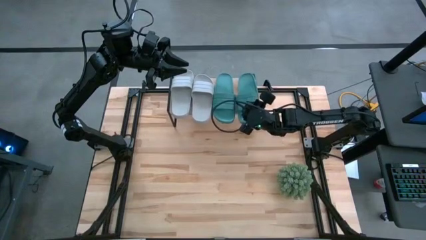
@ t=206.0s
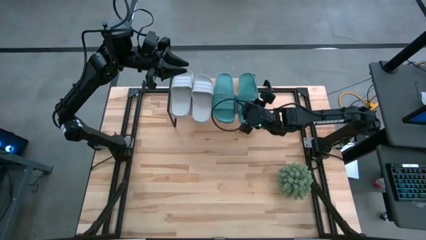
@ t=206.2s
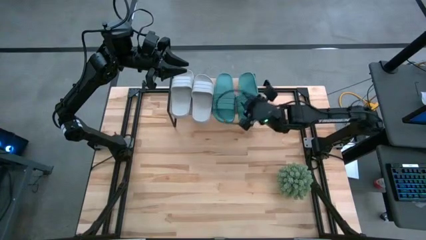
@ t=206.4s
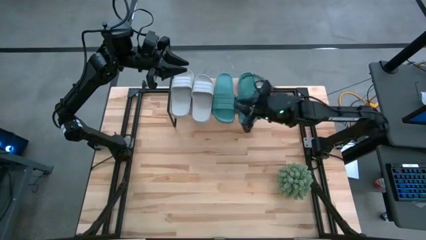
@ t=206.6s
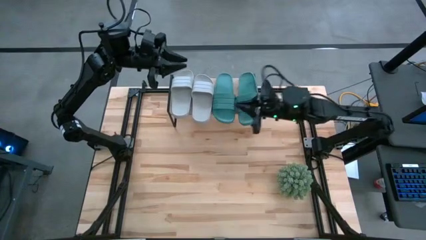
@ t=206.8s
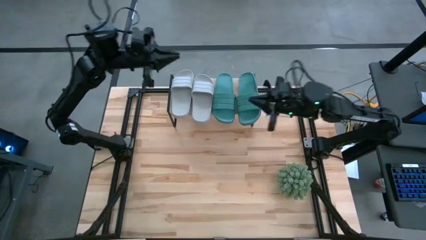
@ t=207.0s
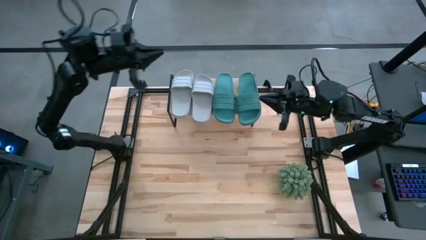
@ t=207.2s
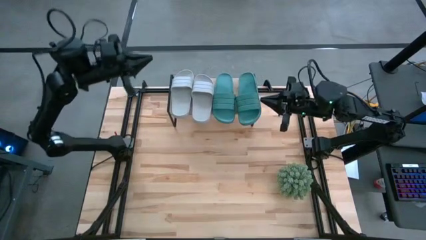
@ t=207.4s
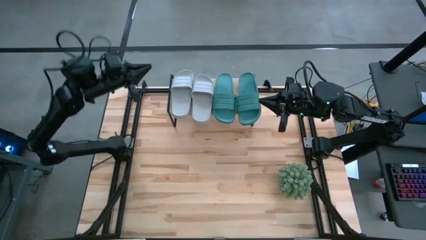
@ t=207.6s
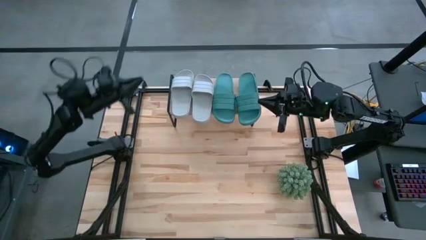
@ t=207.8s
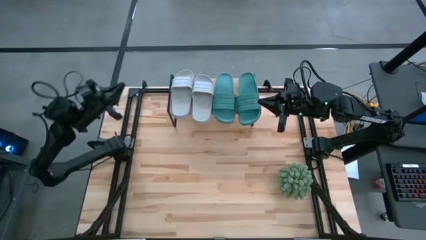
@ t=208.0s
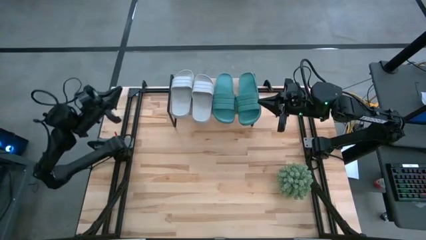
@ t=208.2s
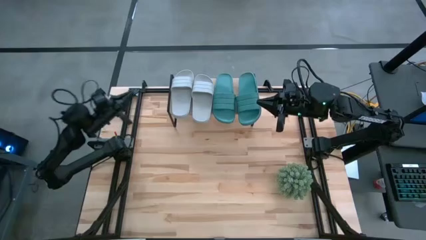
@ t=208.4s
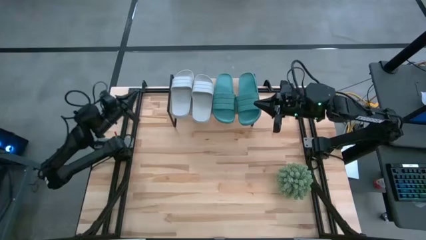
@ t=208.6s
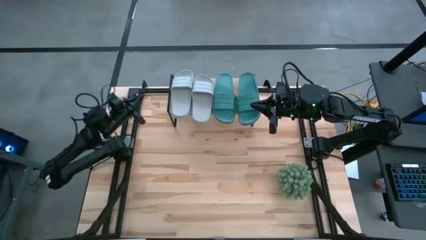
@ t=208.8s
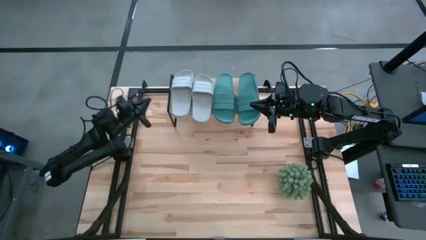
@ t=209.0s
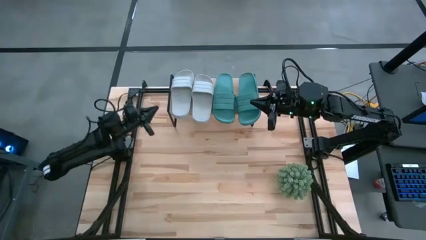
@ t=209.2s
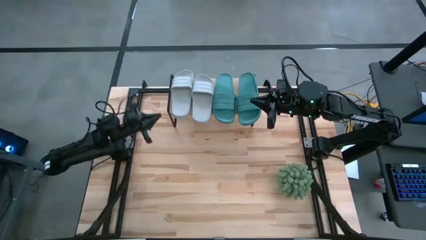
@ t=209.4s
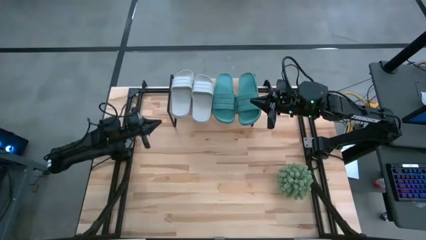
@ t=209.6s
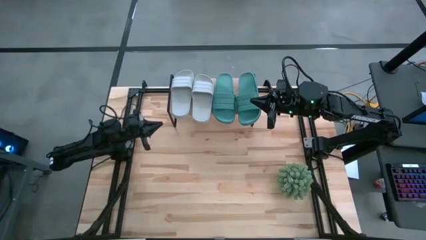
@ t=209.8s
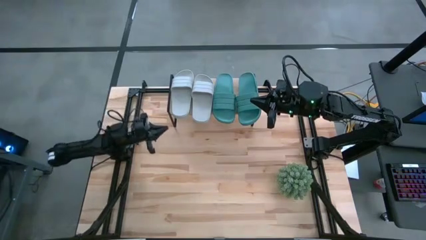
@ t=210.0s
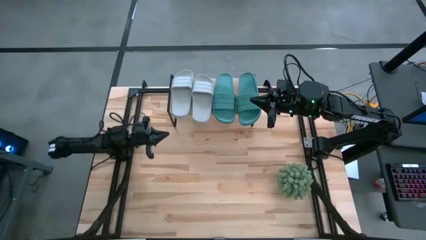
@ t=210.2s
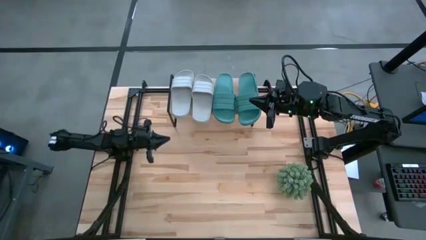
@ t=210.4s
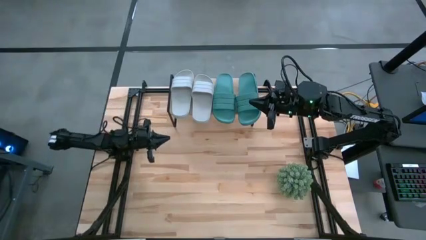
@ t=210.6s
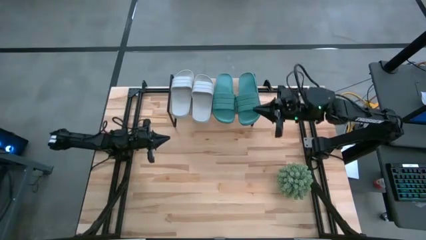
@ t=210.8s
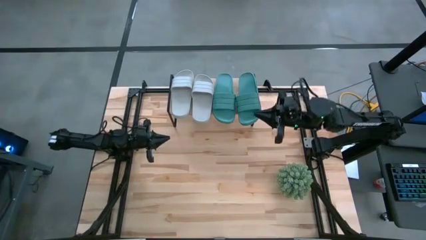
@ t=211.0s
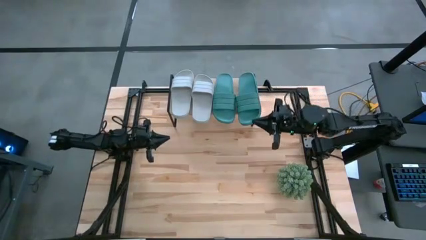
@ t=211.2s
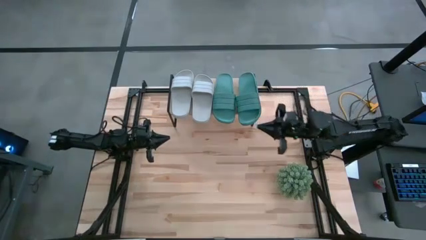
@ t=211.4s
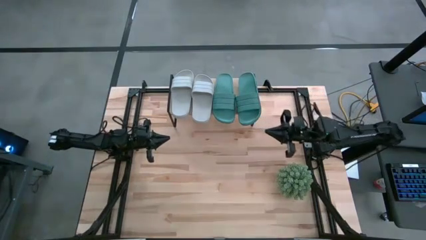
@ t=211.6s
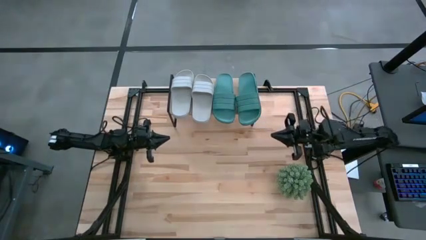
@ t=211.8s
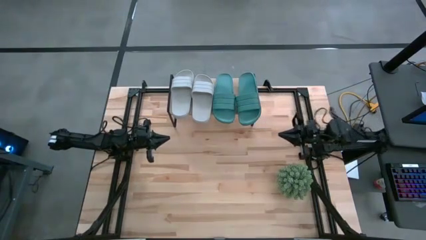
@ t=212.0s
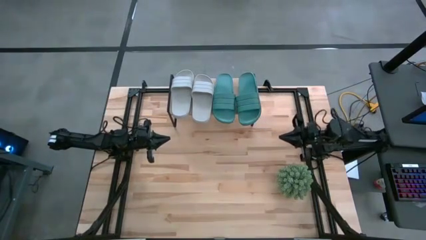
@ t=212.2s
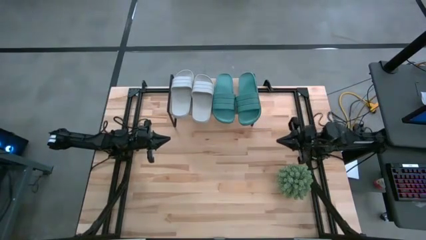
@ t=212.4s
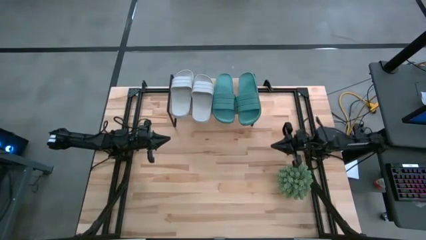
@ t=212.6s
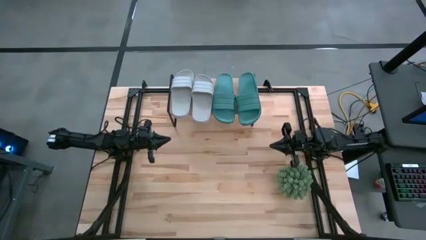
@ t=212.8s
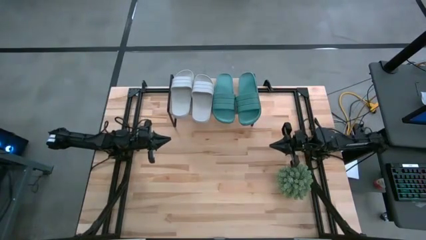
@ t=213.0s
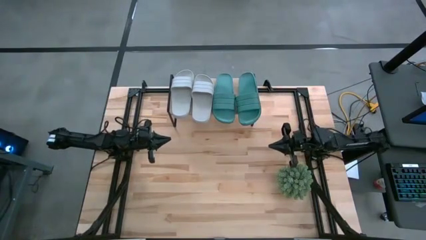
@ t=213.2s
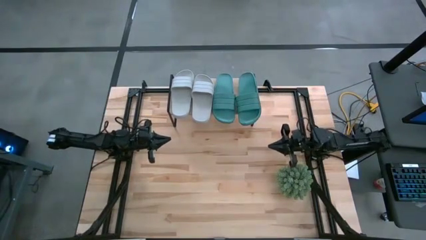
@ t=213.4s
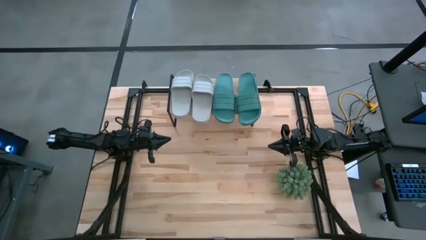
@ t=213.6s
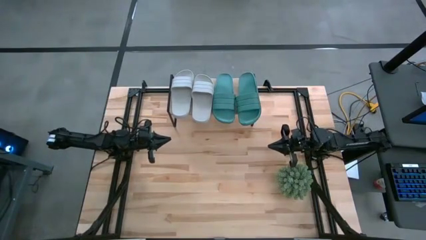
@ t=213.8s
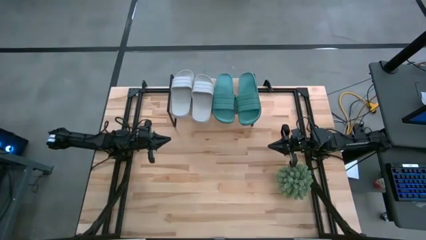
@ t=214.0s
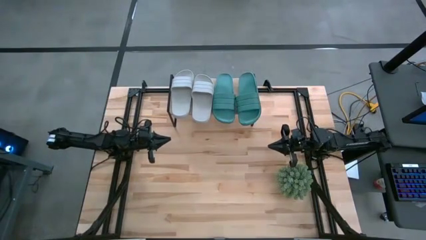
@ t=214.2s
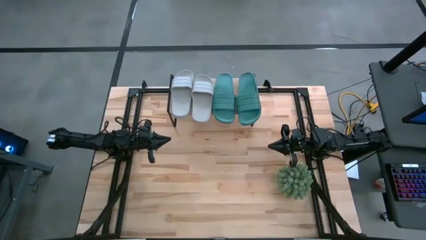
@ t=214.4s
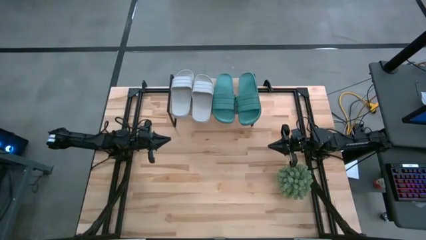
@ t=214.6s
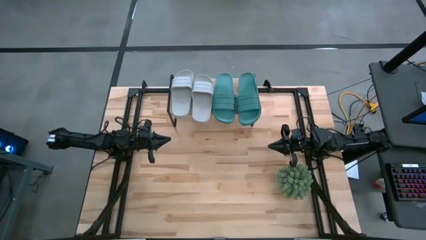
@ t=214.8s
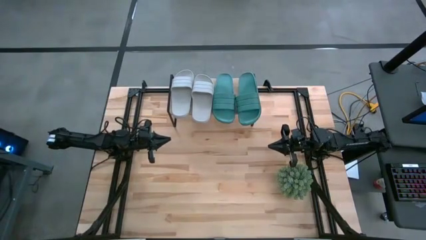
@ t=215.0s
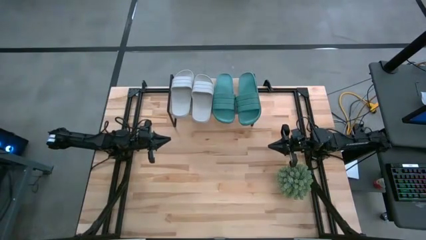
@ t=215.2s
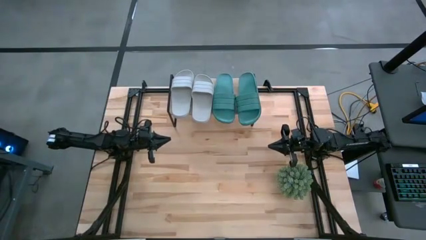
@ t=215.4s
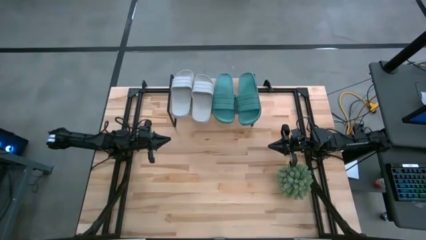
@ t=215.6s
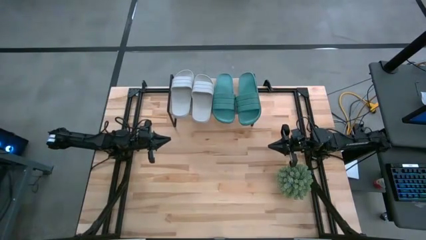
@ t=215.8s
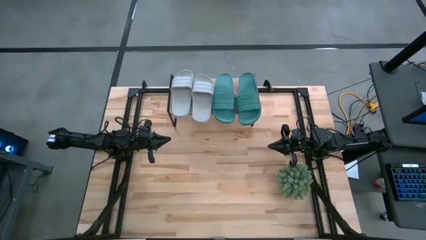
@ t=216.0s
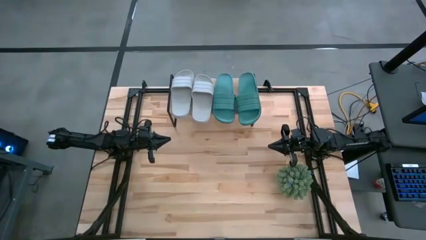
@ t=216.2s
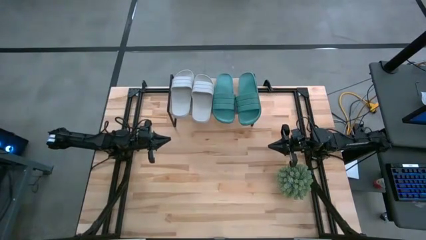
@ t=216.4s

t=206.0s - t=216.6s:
Task: Pick and place slides into the shelf
Return to Home Position

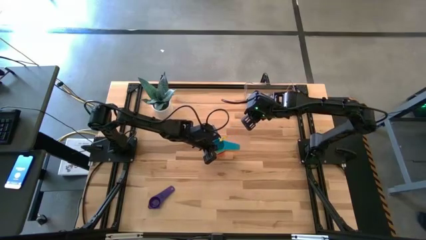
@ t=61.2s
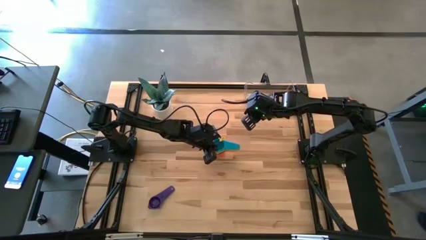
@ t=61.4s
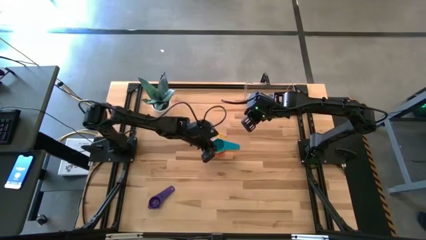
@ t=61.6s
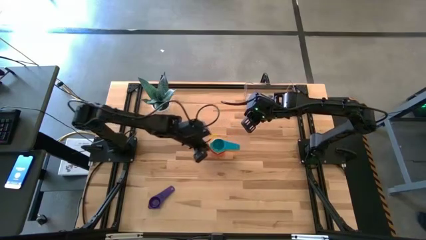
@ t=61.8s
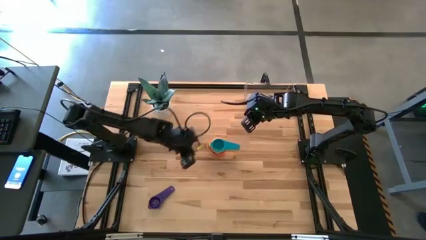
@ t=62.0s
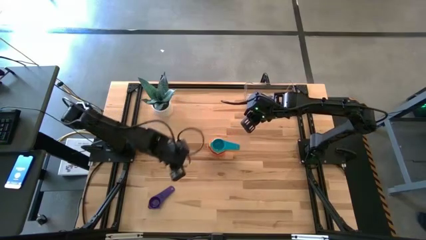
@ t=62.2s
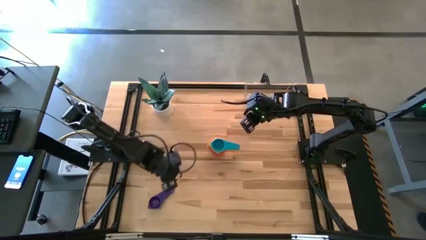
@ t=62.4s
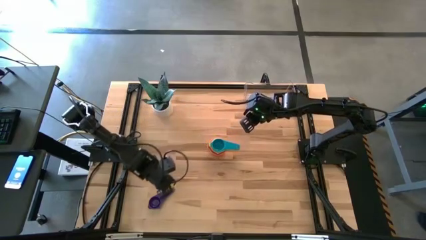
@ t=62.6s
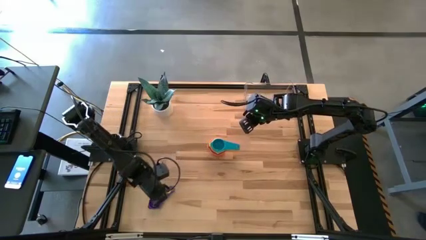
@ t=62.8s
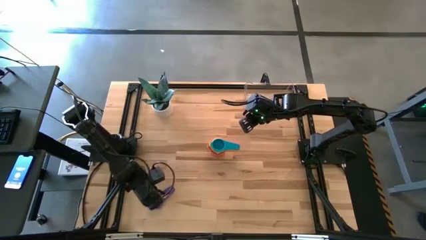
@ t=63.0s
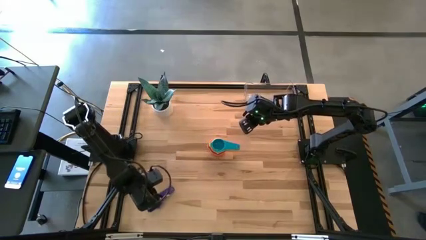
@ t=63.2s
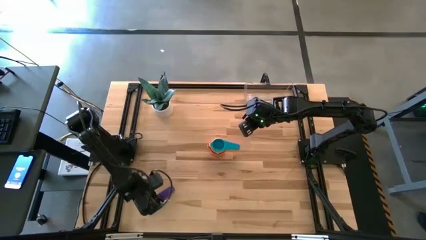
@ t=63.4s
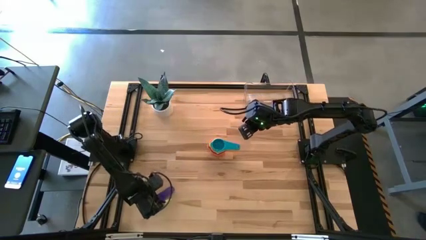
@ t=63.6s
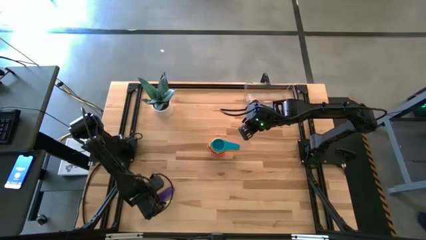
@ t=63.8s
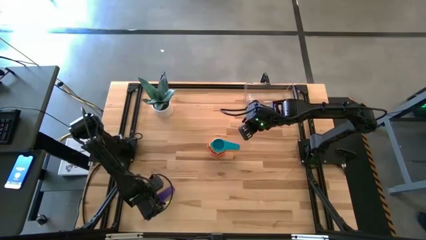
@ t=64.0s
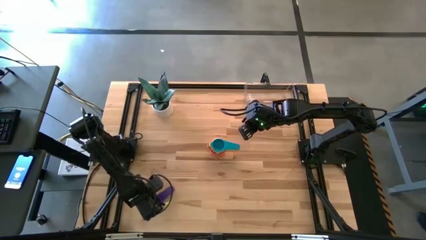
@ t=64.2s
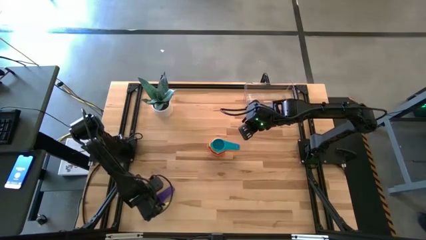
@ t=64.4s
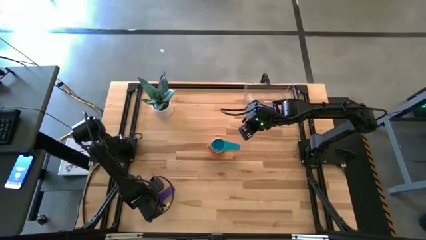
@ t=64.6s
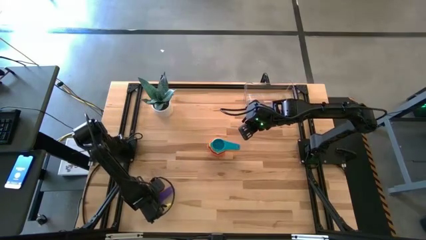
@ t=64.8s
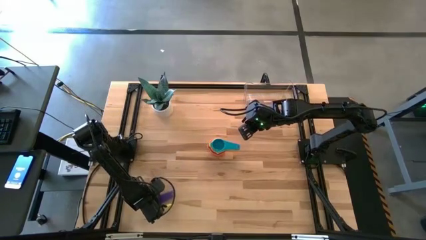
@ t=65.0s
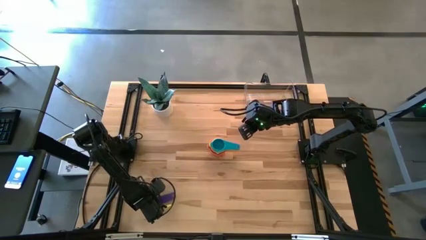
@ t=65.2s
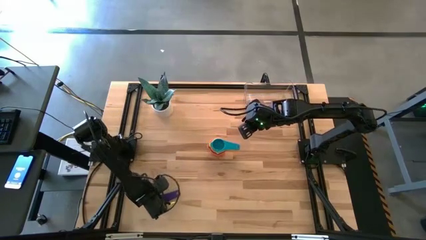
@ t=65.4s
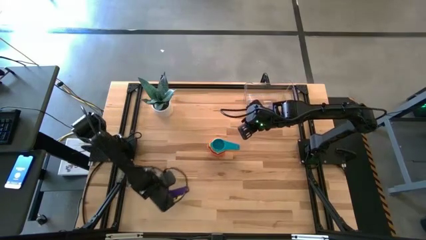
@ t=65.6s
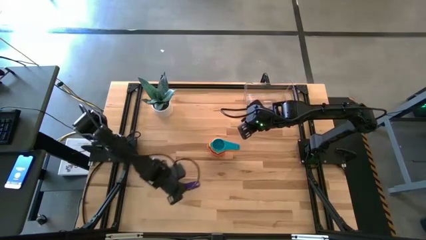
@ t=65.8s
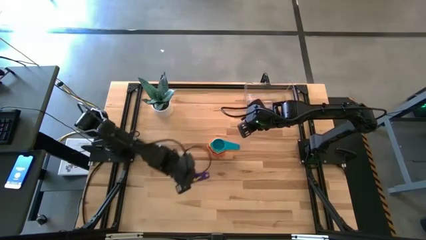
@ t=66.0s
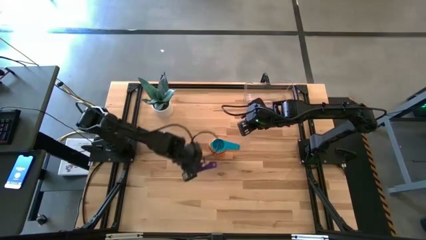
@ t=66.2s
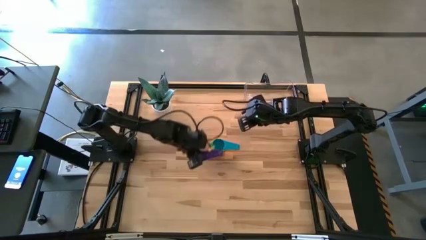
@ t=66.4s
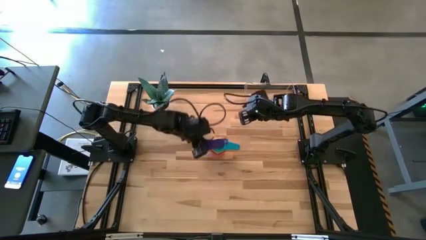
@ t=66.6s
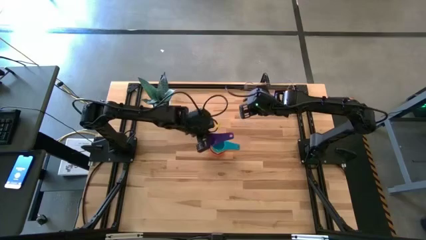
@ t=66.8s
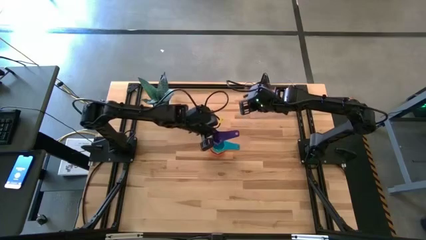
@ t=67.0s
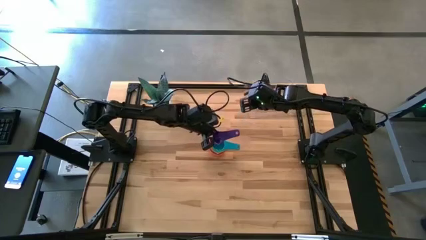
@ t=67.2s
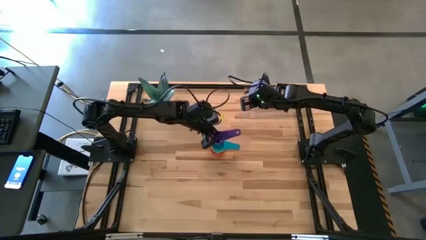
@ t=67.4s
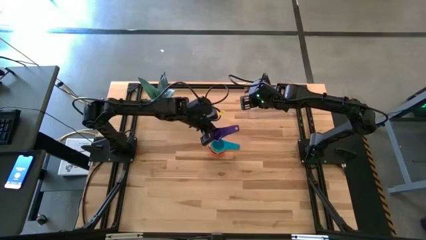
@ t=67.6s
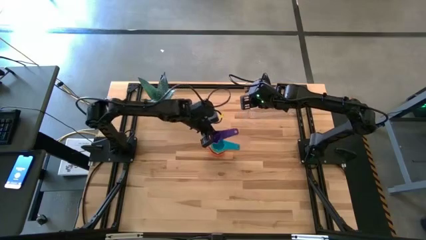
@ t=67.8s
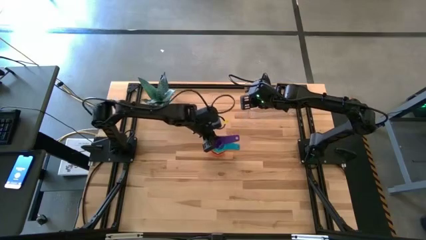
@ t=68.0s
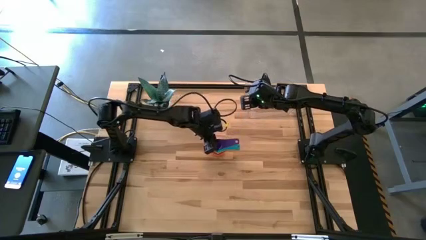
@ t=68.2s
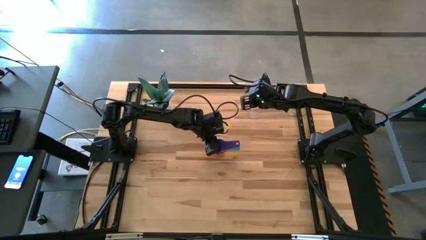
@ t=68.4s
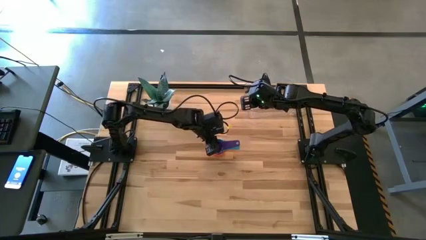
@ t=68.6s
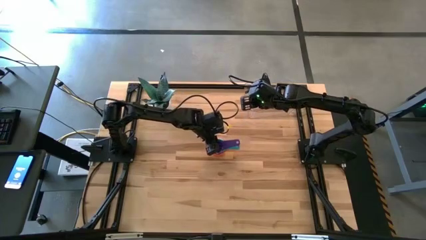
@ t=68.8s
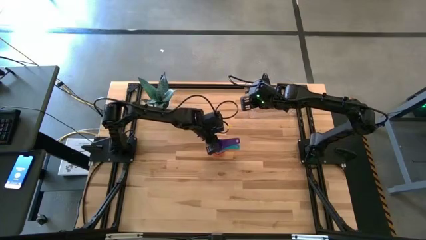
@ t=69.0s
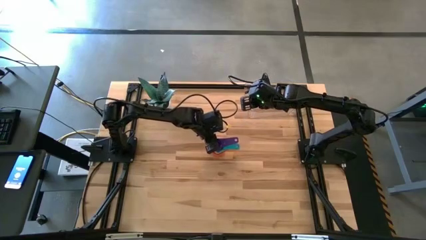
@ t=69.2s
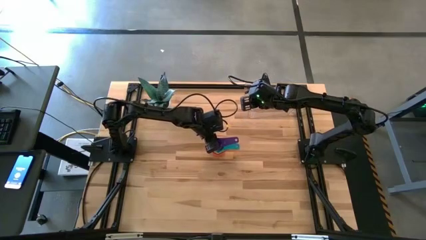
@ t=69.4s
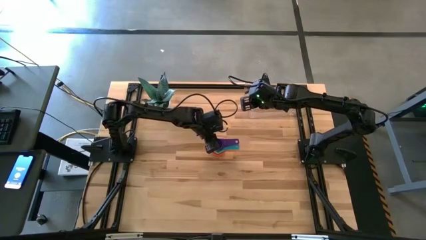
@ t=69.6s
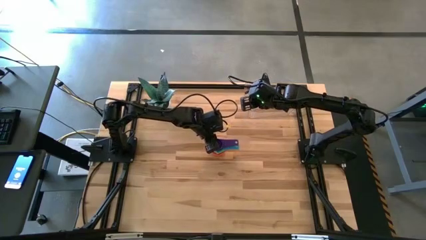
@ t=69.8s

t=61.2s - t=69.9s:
Task: Nest measuring cups in basket
Stack the violet measuring cup on top of the light blue measuring cup
